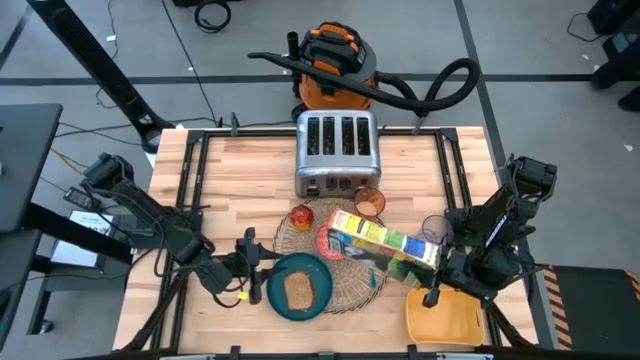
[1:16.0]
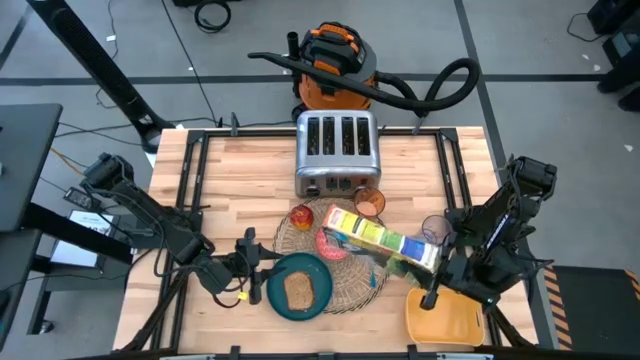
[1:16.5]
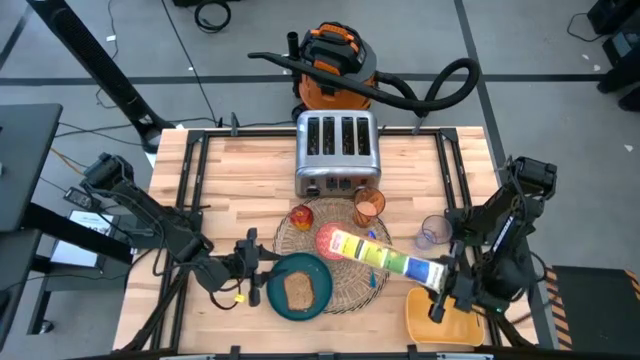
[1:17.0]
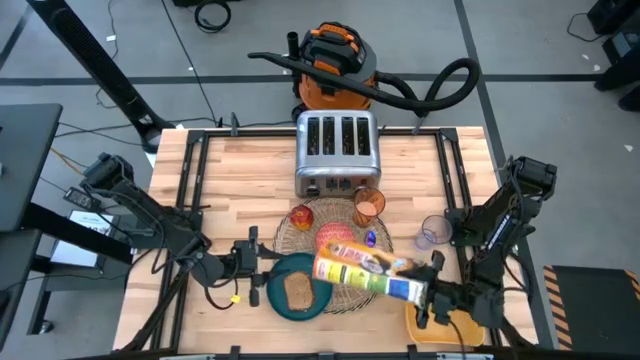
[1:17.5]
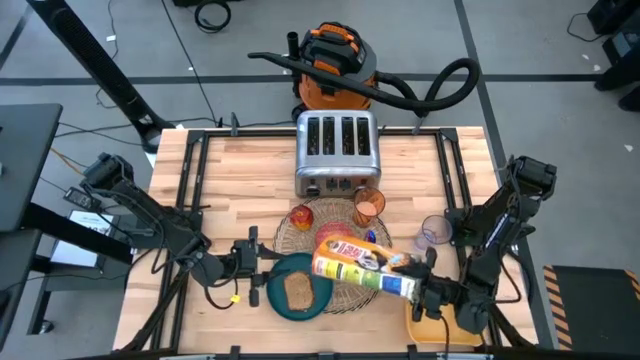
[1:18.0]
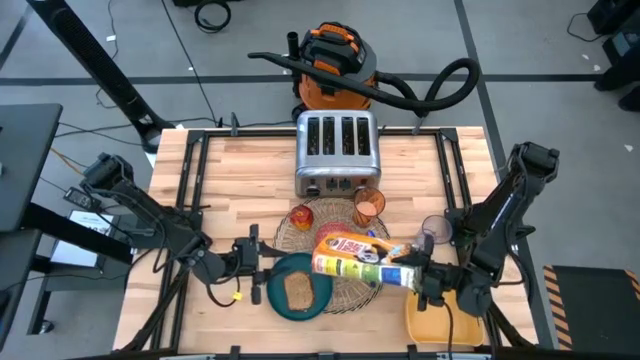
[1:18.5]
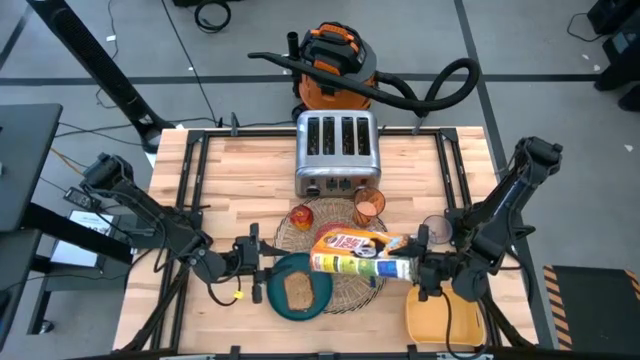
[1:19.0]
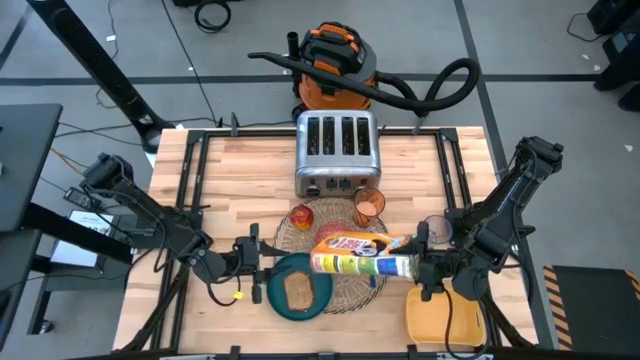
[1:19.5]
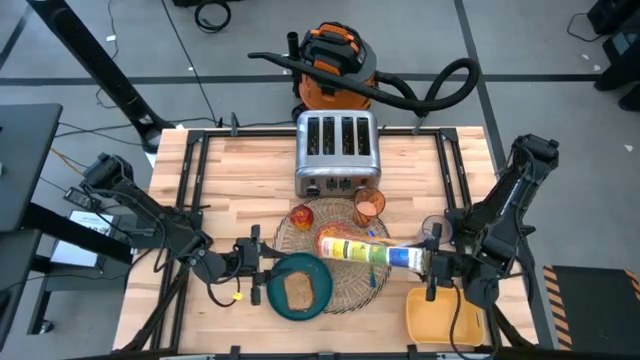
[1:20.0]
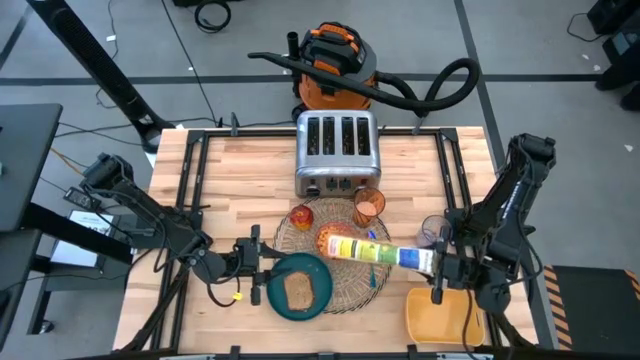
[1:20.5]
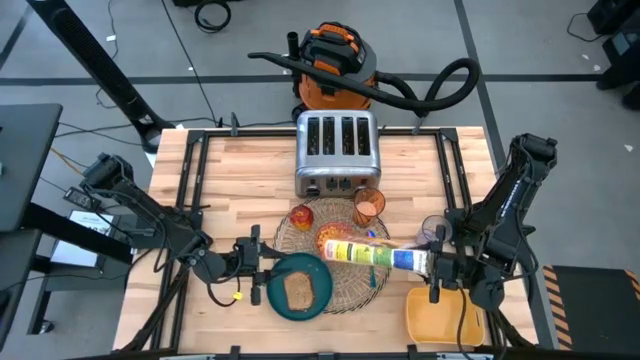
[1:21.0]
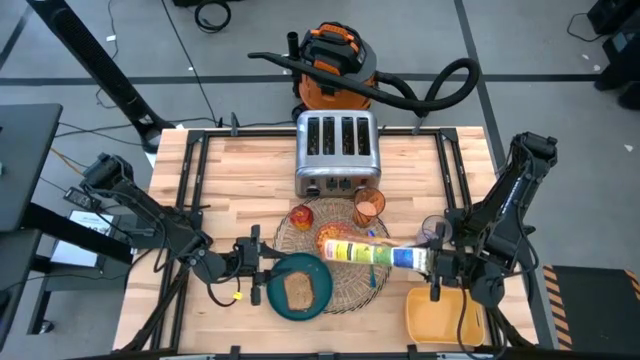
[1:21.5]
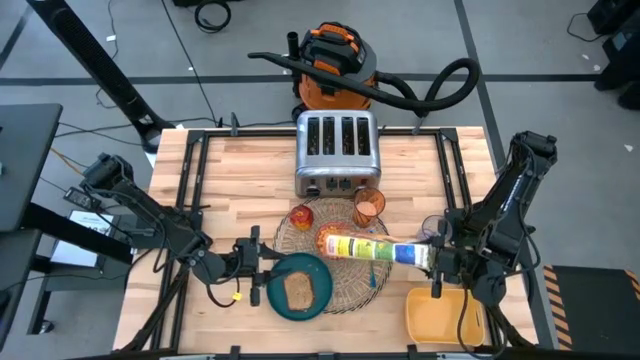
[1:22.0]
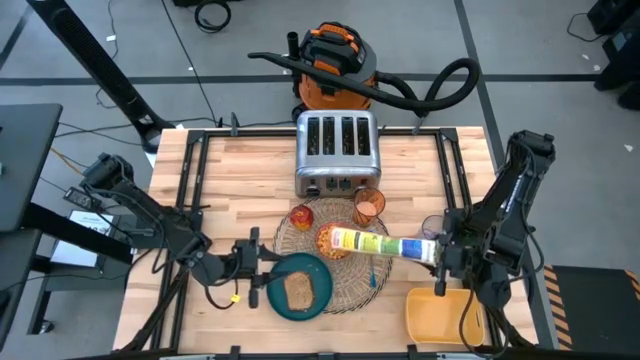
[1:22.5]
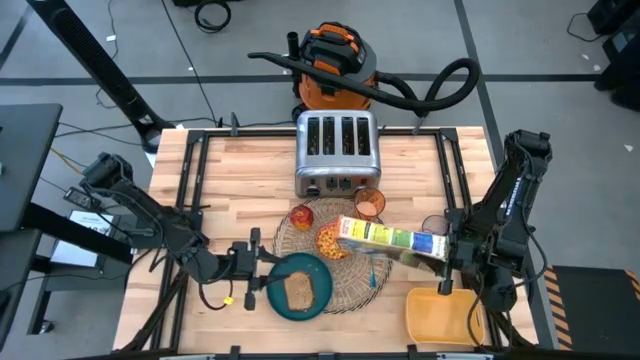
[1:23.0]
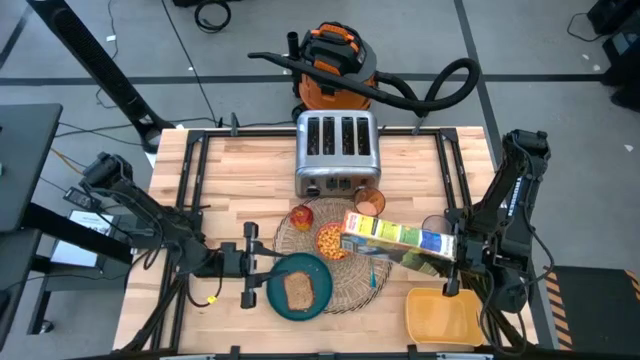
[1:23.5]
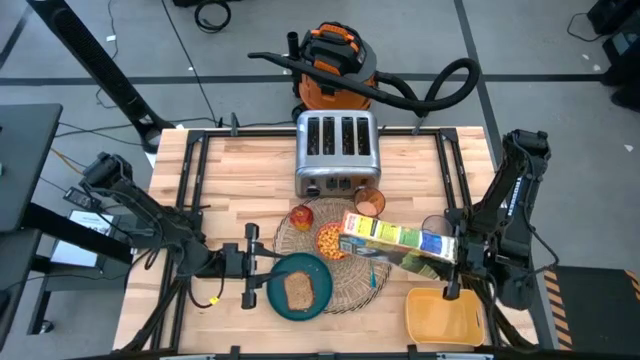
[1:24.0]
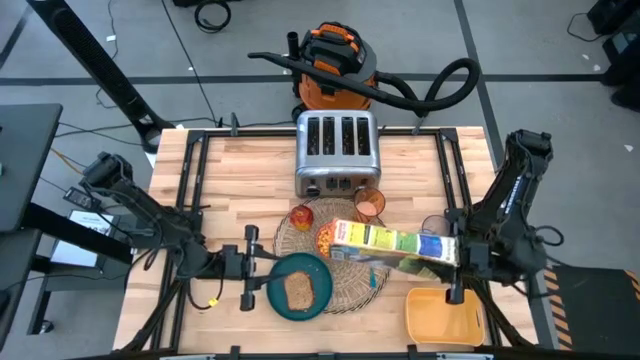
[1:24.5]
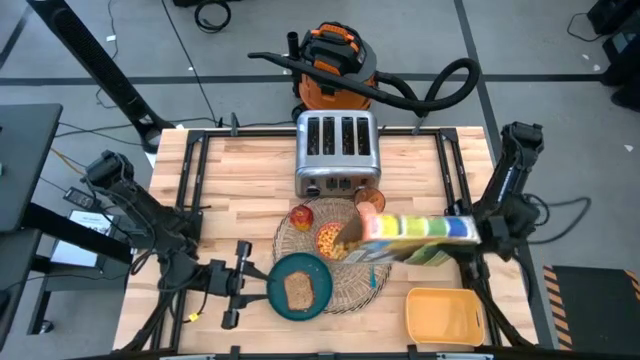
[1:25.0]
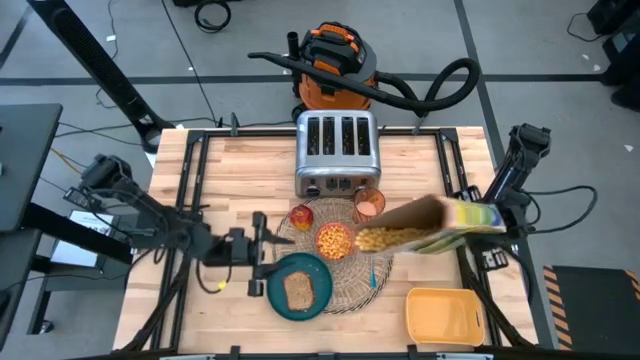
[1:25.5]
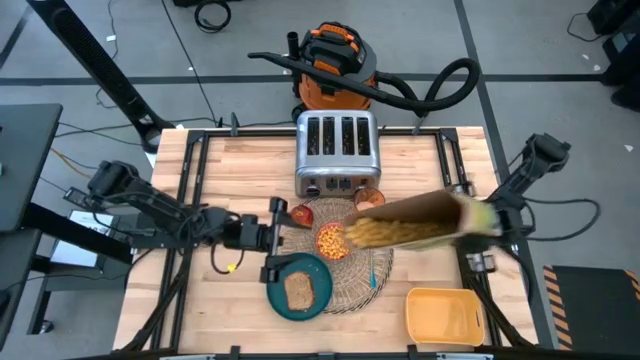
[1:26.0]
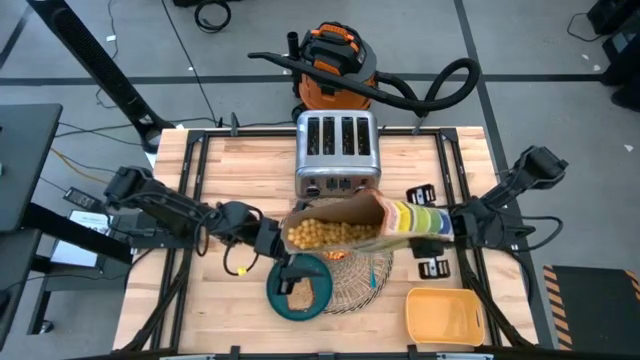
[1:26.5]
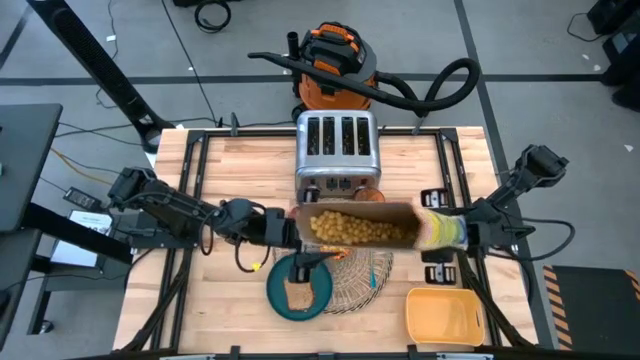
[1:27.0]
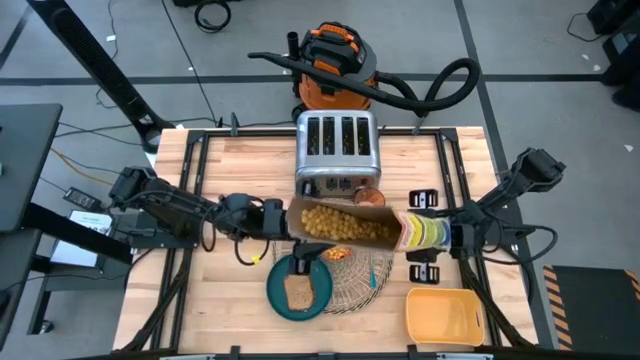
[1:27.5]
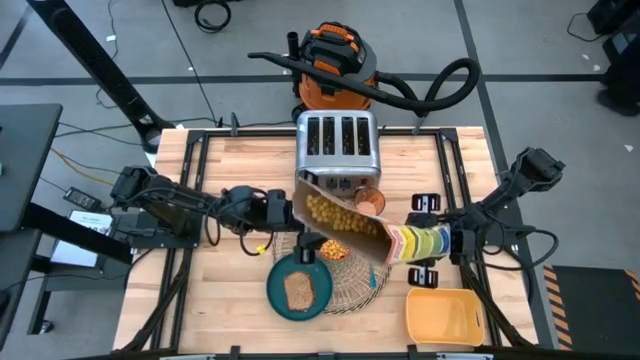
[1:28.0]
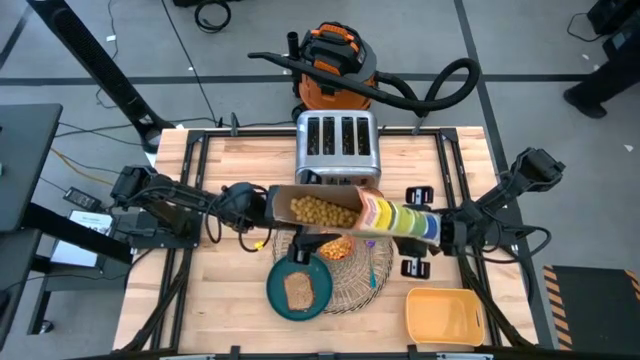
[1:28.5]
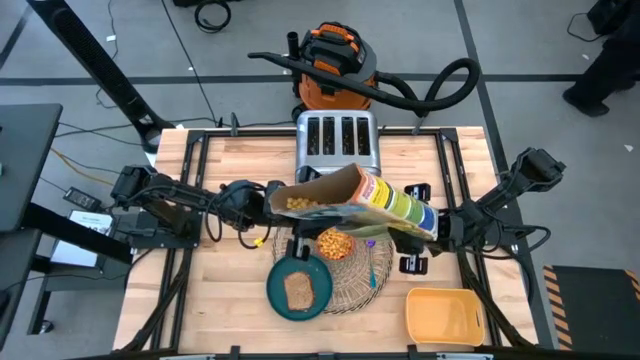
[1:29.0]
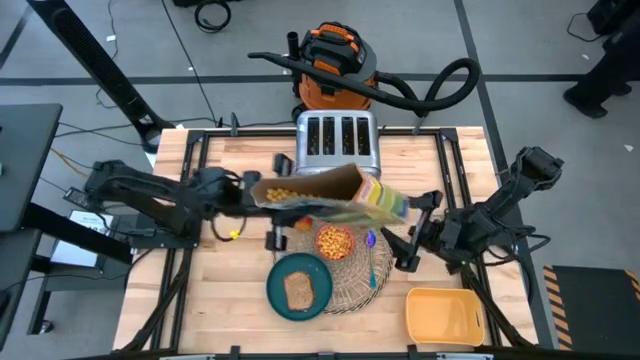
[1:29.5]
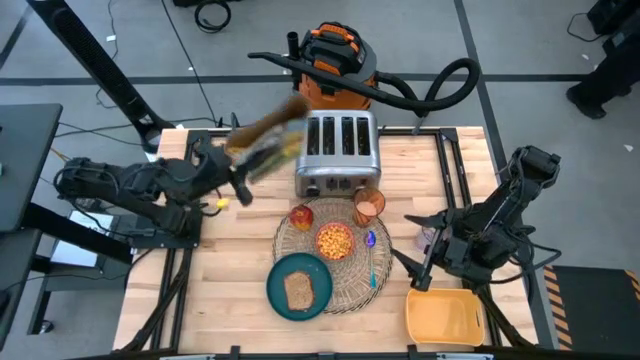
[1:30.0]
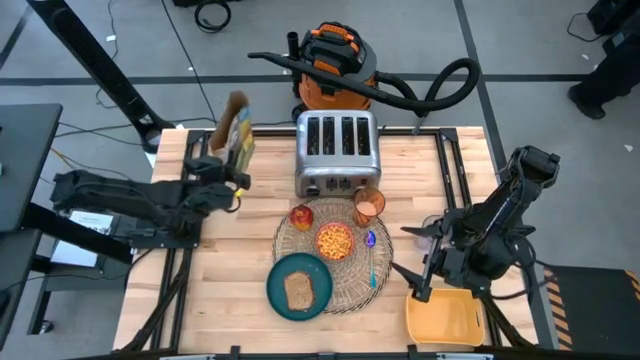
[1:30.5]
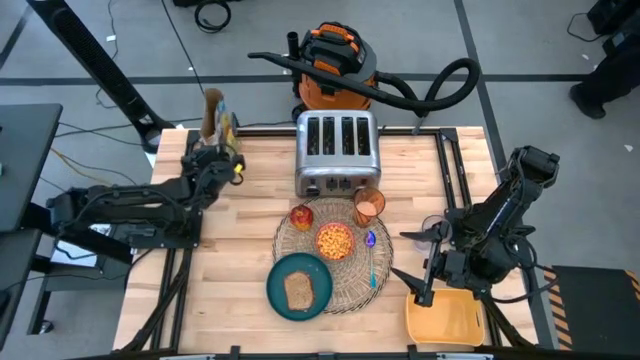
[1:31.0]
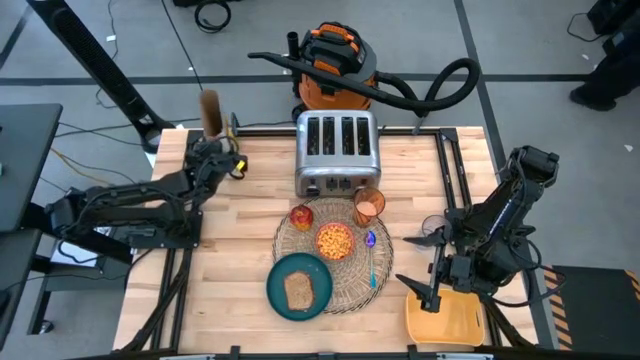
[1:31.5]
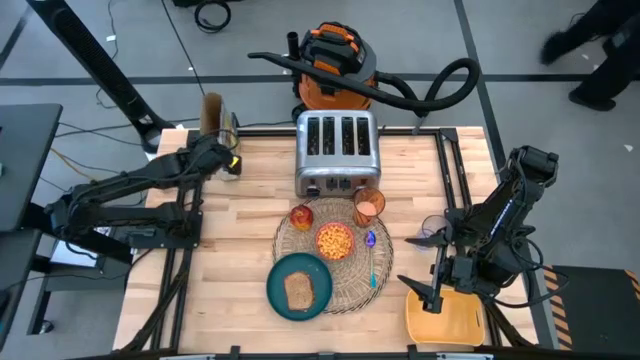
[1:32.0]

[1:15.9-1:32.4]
Task: Arrange a breakfast setting
Pour the yellow cereal from the cereal box into the red patterned bowl

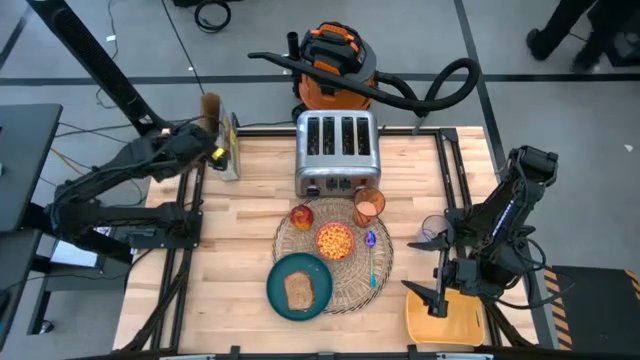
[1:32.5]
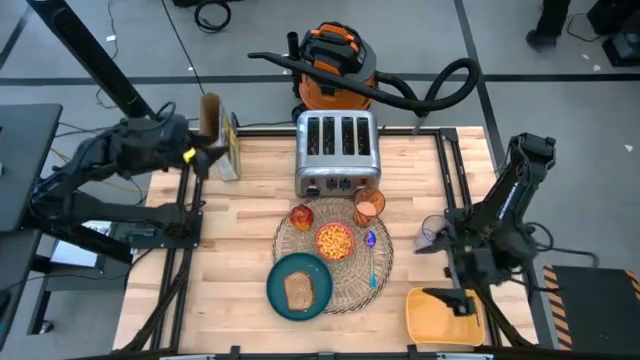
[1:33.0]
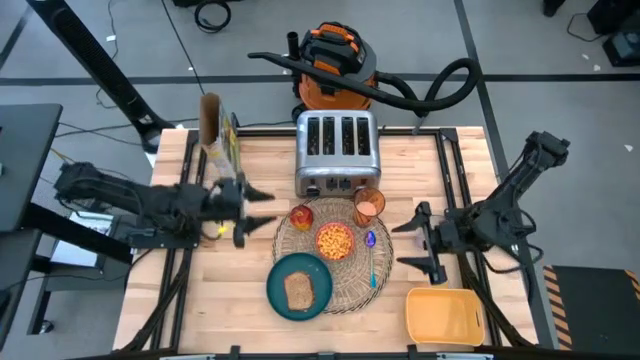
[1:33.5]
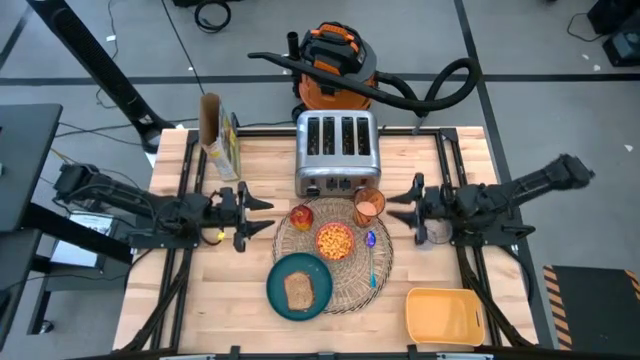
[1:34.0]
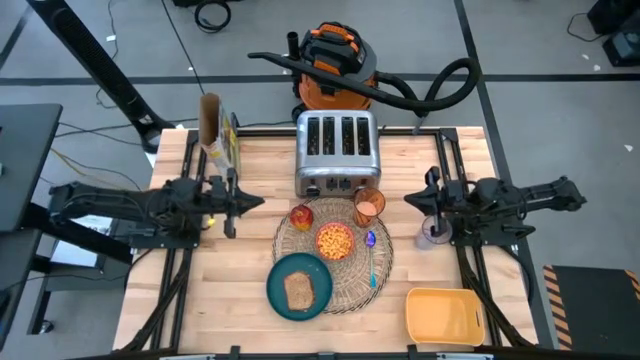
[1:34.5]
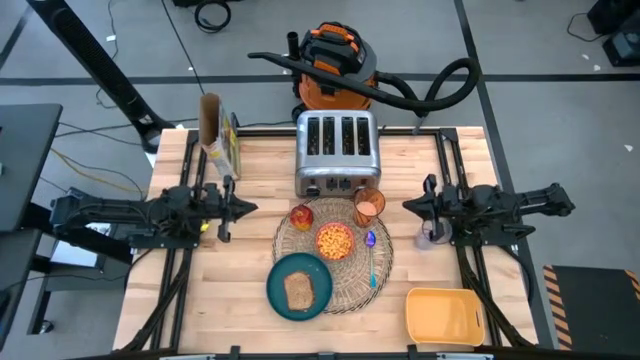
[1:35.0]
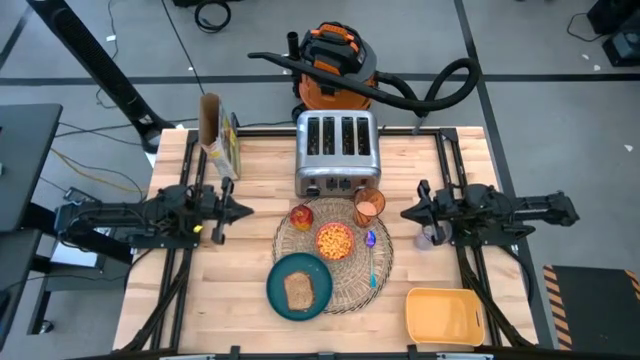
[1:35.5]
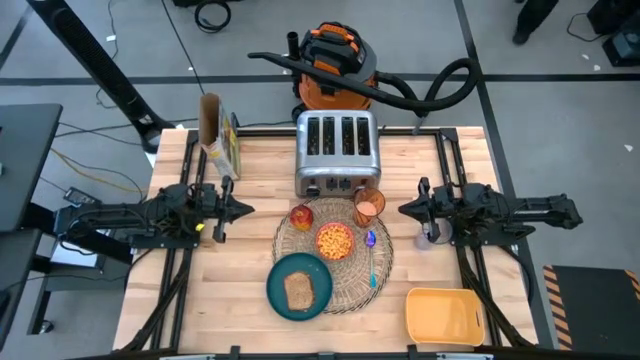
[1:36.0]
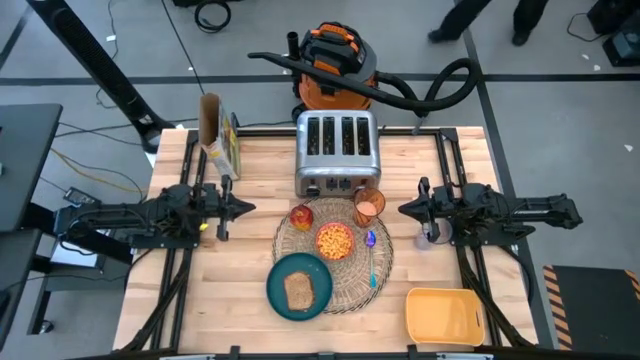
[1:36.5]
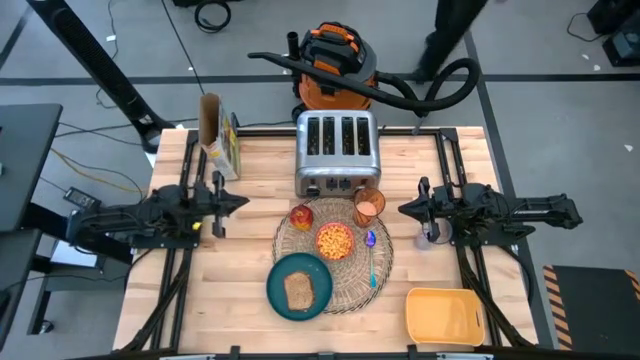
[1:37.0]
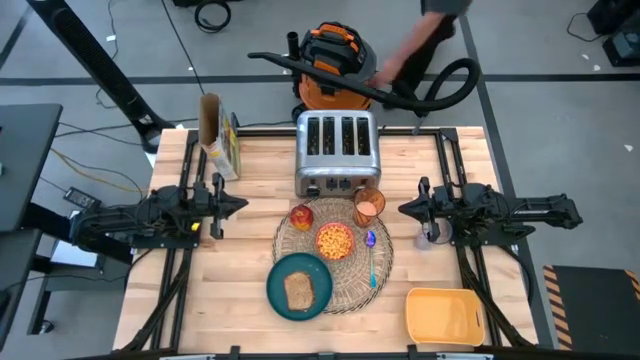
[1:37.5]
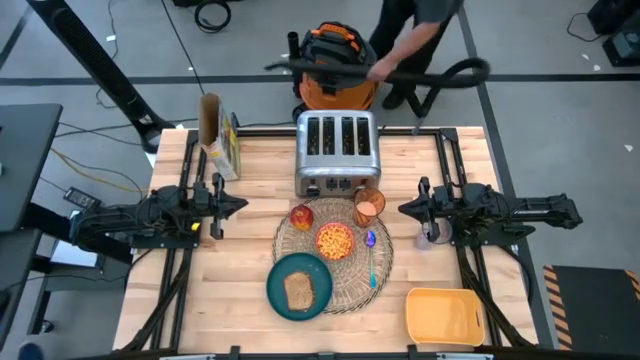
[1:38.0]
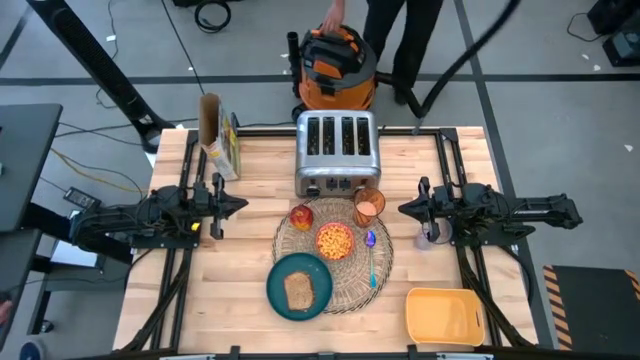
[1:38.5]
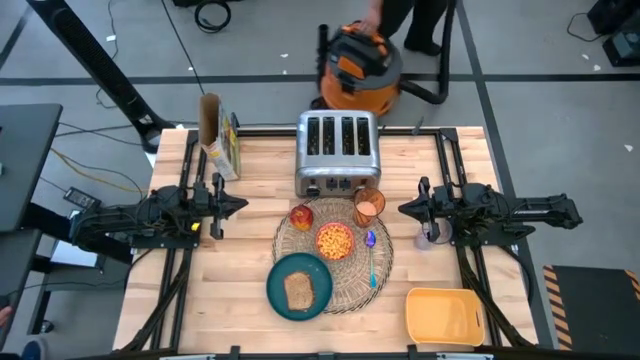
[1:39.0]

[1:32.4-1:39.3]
Return to Home Position
